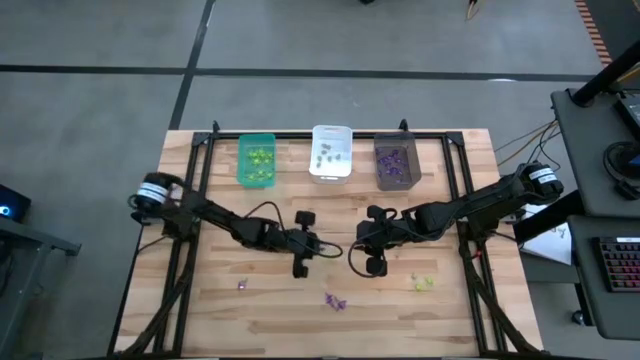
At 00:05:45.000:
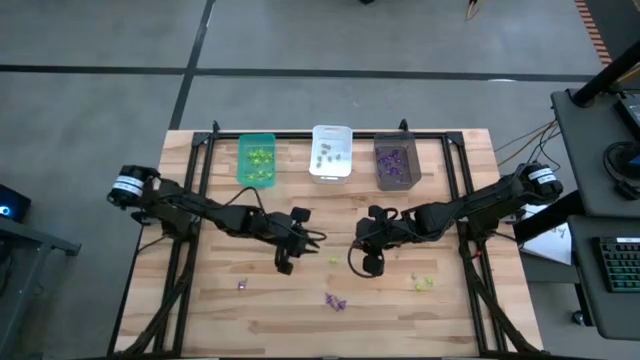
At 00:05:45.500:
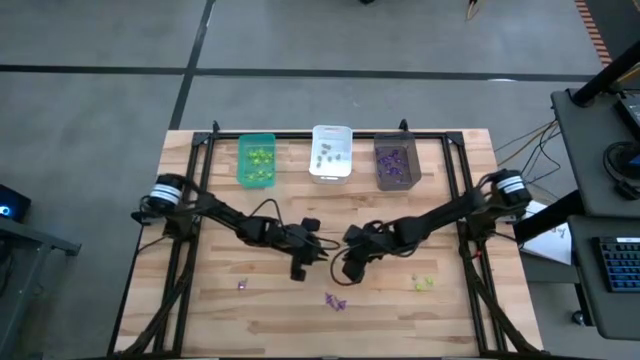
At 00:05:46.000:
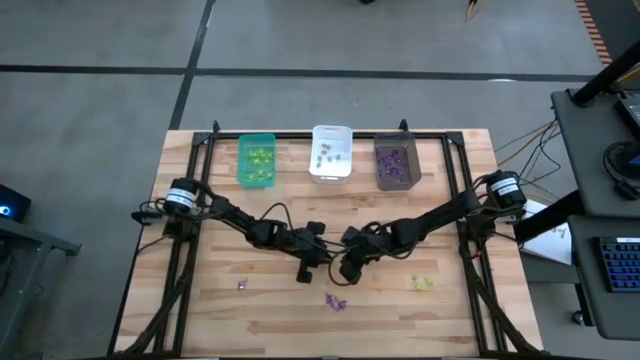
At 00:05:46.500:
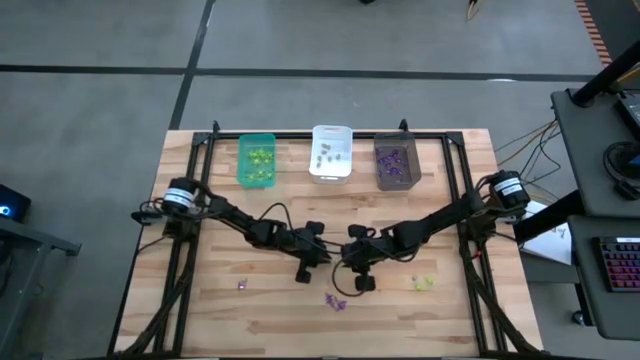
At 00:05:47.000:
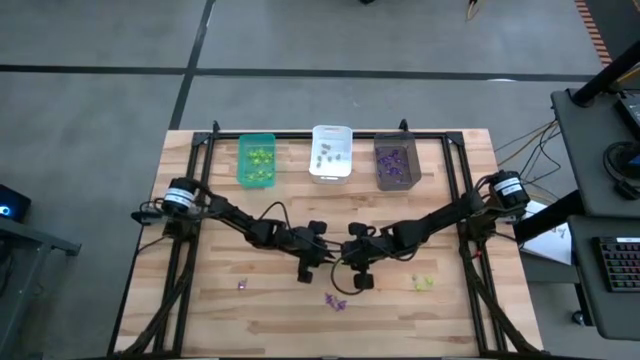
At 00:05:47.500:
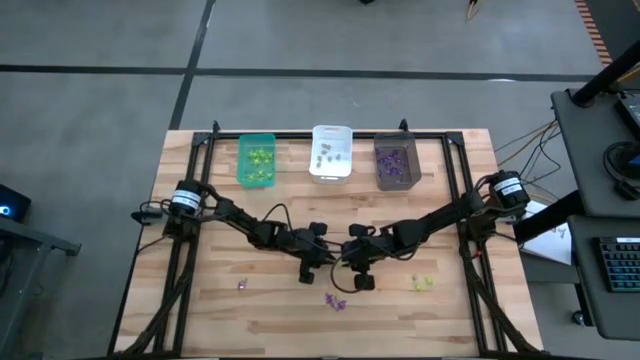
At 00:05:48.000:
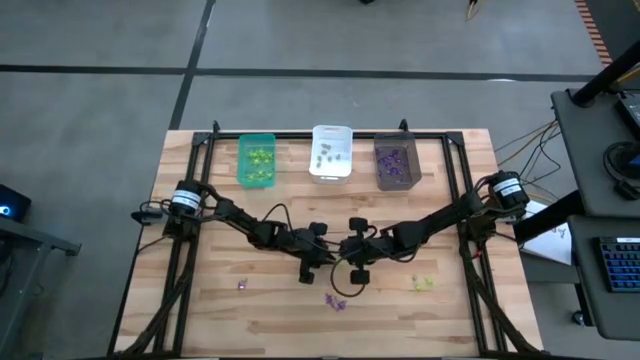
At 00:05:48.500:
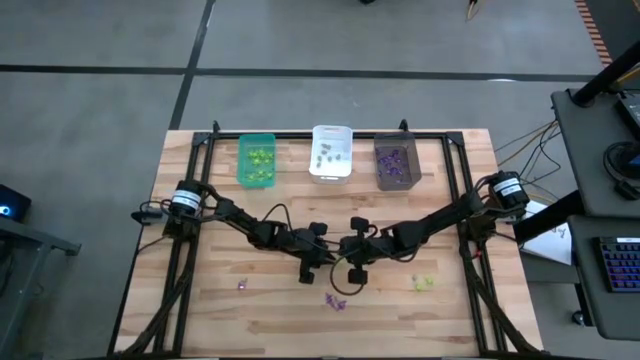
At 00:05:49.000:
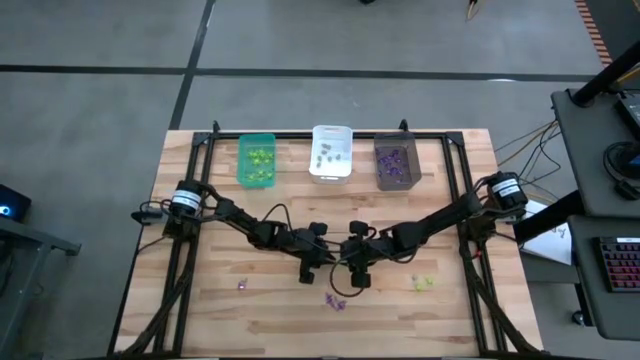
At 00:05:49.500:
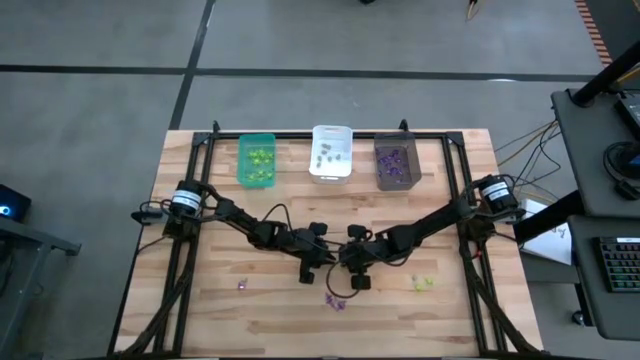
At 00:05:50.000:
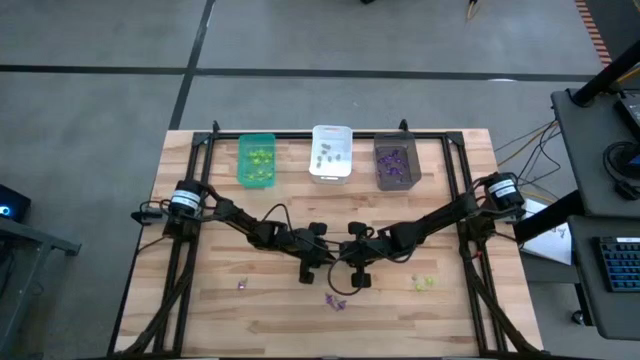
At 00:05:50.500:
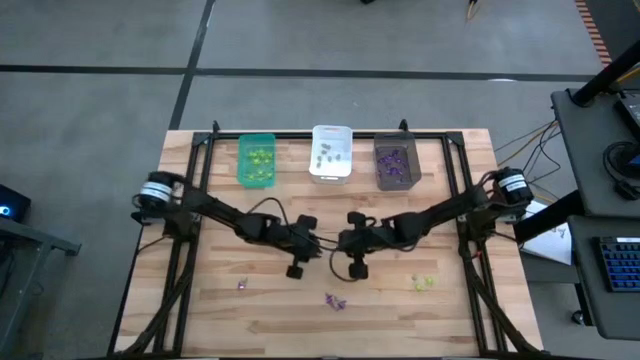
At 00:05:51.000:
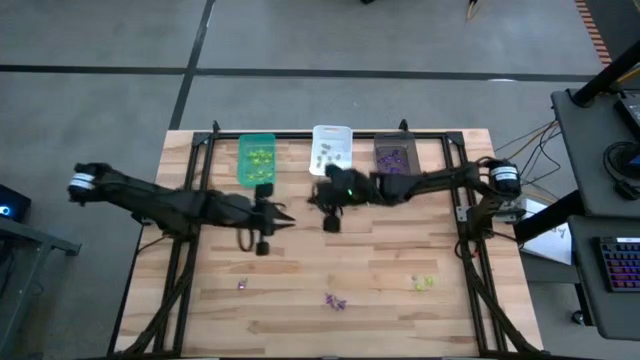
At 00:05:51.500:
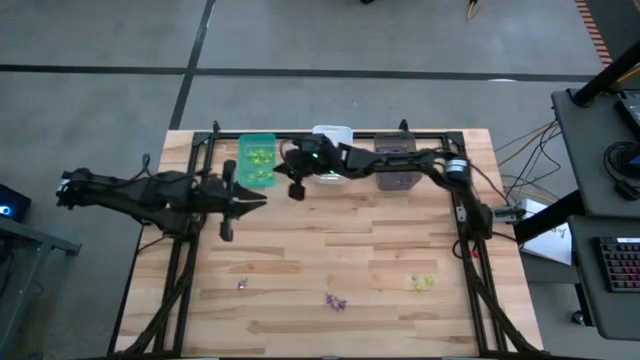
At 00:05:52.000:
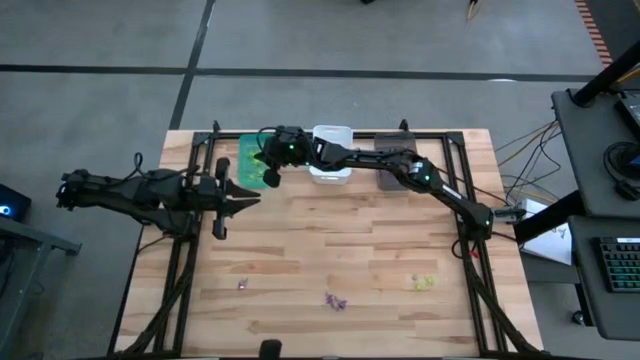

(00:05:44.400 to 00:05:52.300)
Task: Sort Halloween decoration
Put the green spider toy into the blue bin

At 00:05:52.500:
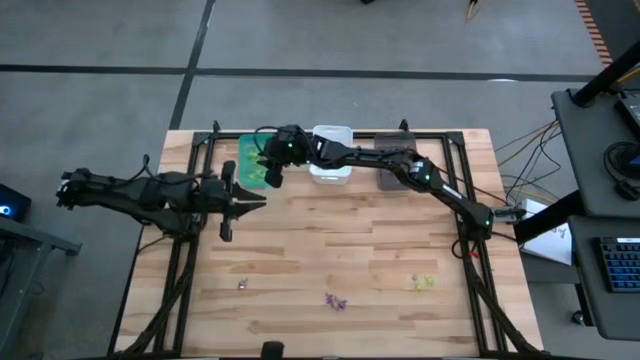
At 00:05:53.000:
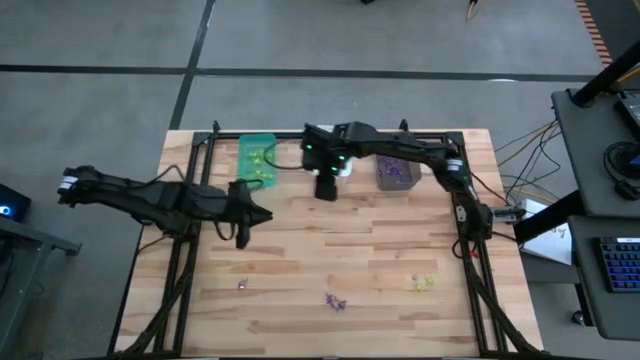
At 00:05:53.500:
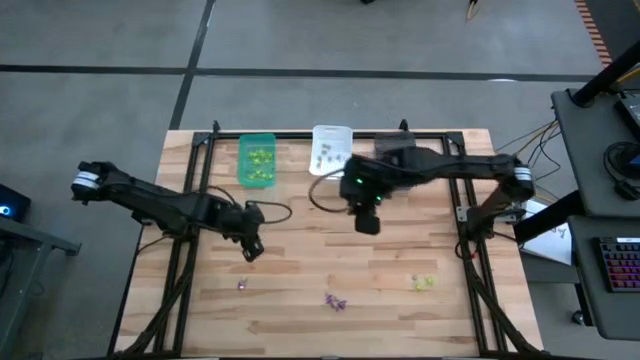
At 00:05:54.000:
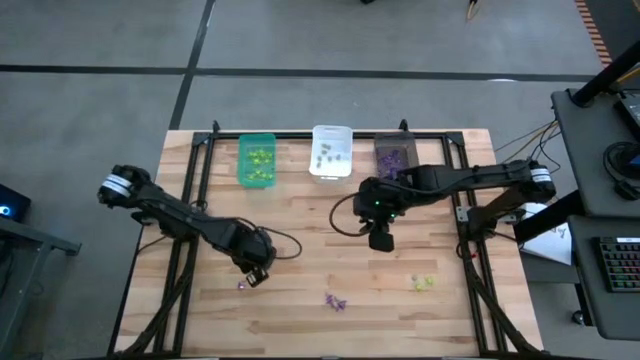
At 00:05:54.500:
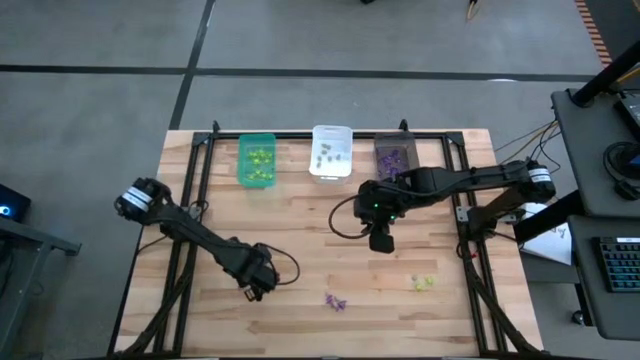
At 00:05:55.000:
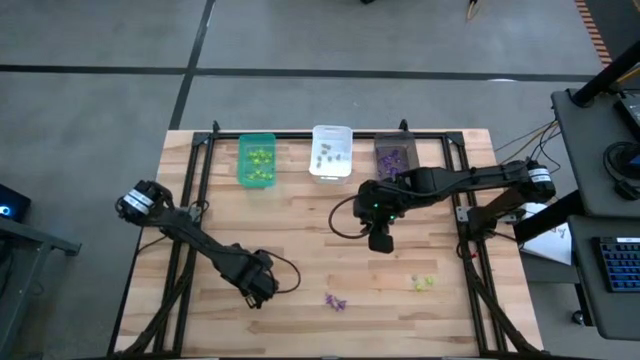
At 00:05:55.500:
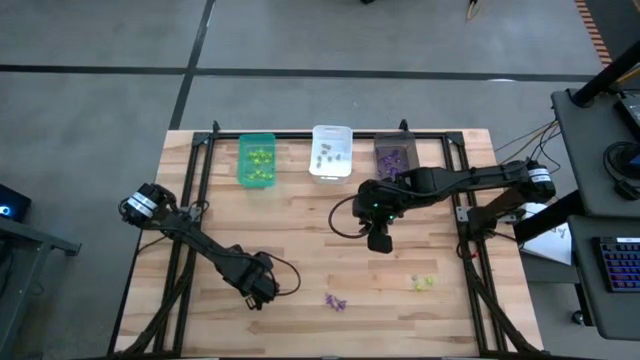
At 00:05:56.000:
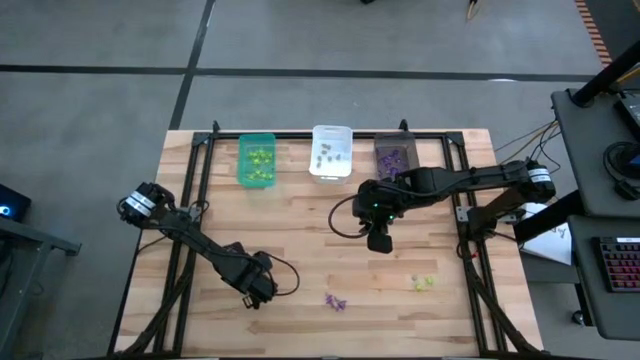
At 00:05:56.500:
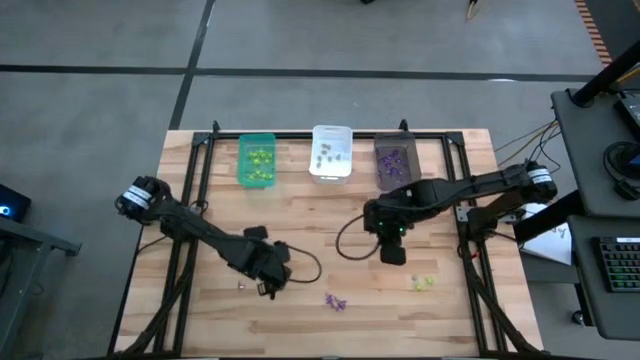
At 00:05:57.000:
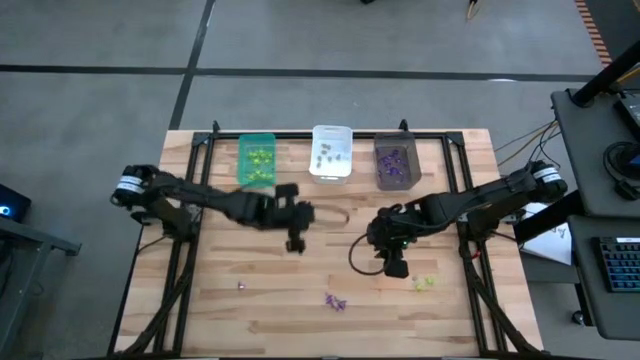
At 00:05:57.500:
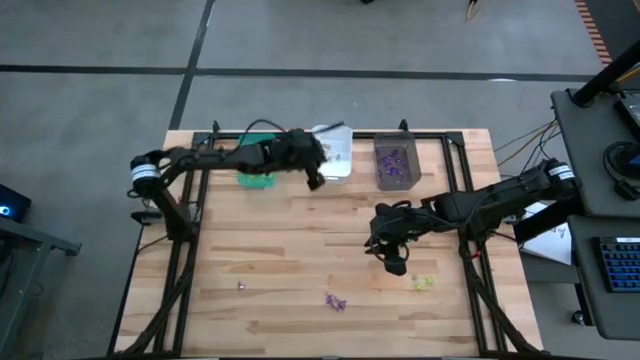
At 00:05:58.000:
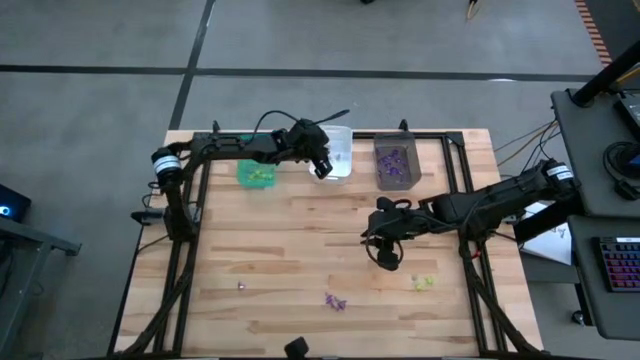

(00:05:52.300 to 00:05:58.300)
Put the white skull toy into the white bin

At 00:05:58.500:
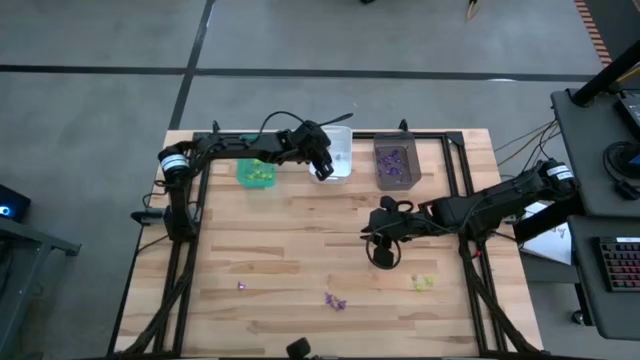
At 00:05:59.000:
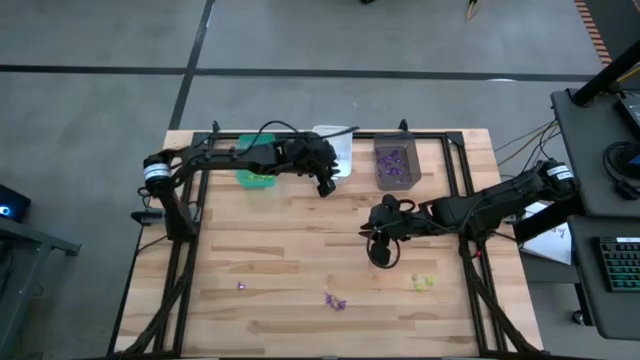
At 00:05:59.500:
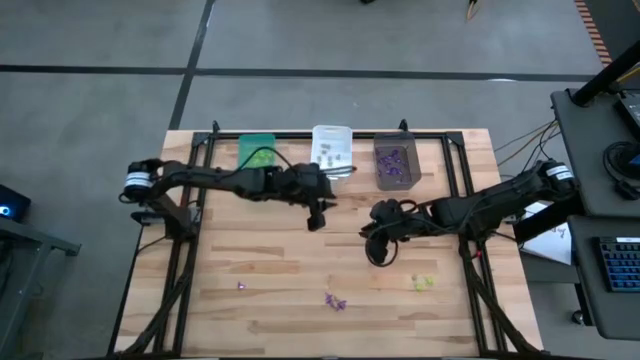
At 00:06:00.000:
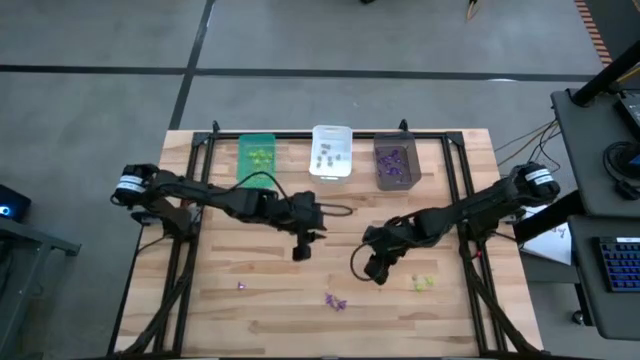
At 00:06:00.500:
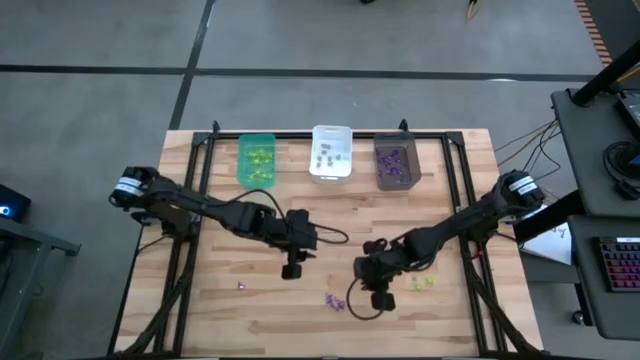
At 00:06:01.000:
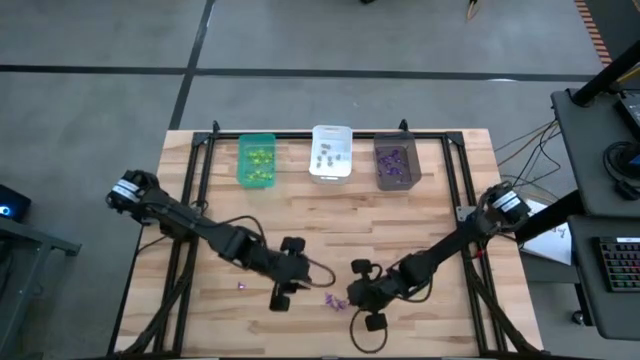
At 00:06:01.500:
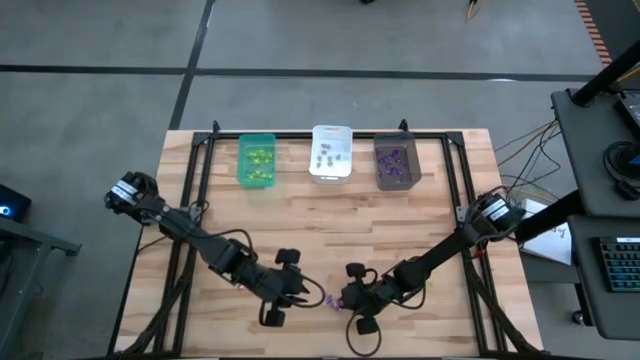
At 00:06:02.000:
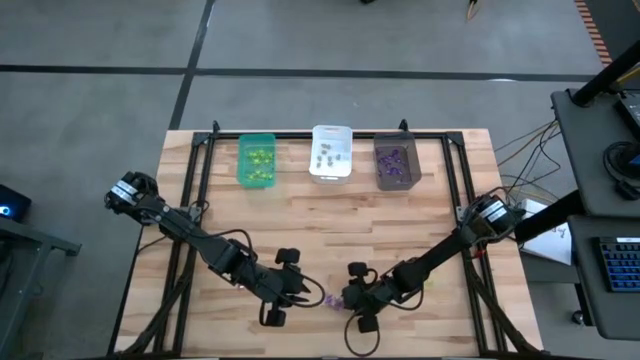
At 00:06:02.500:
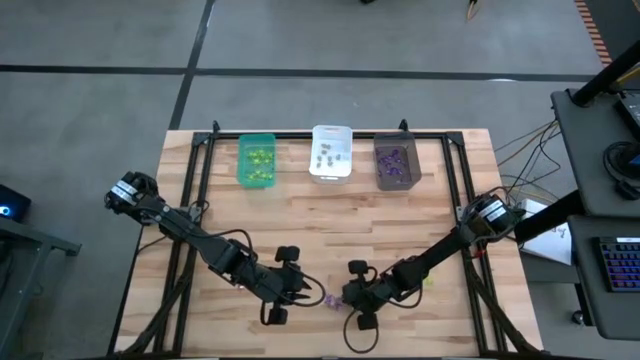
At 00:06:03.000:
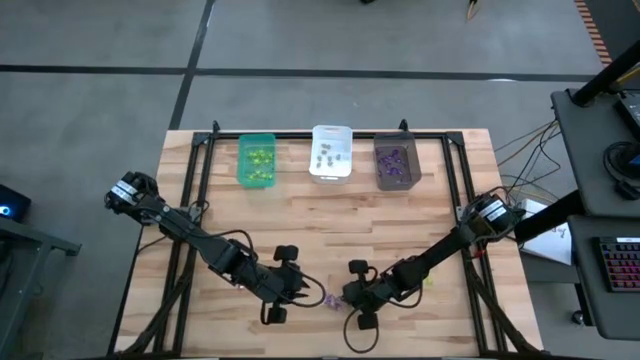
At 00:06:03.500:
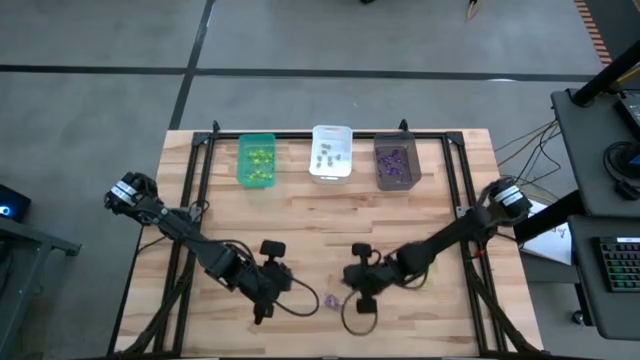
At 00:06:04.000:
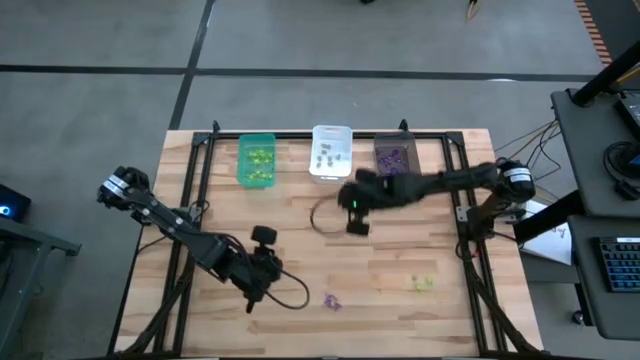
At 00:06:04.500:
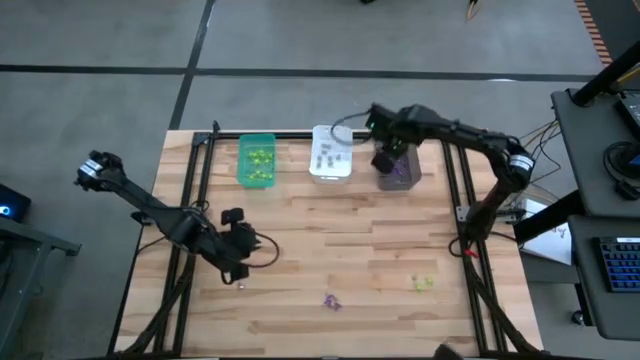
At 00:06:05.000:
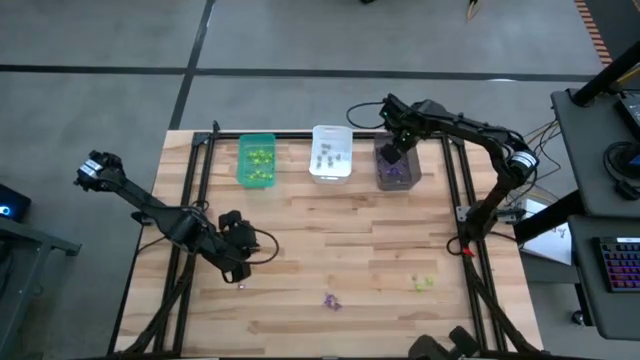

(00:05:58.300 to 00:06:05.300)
Put the purple witch hat toy into the gray bin
